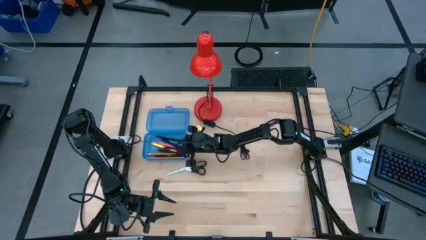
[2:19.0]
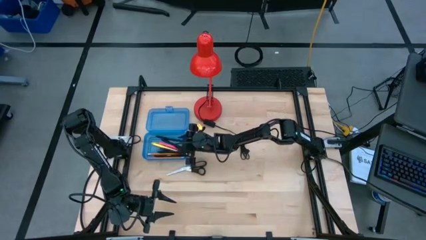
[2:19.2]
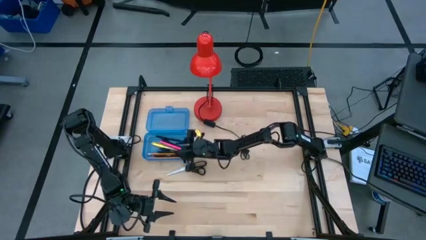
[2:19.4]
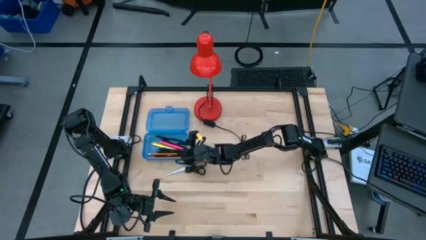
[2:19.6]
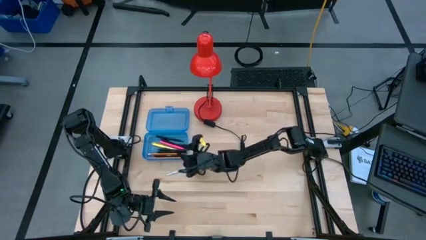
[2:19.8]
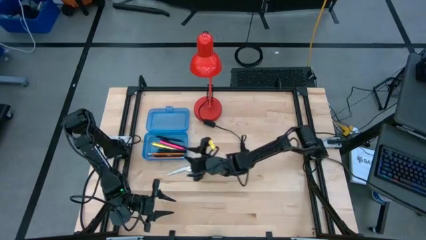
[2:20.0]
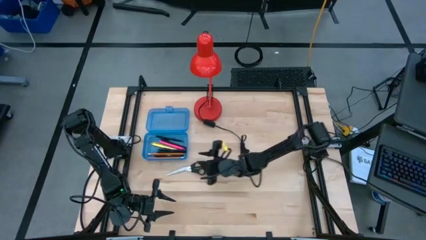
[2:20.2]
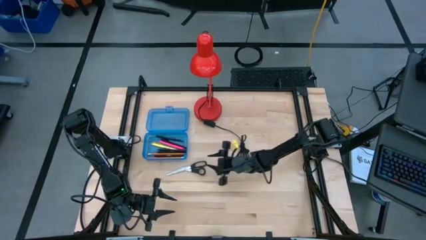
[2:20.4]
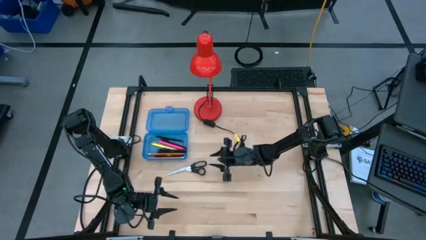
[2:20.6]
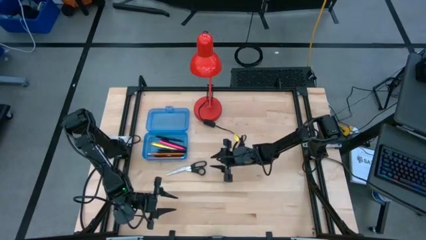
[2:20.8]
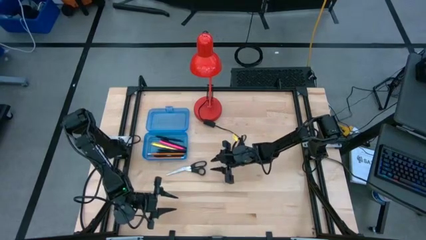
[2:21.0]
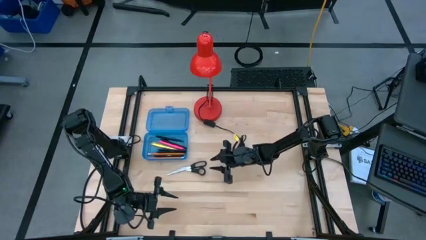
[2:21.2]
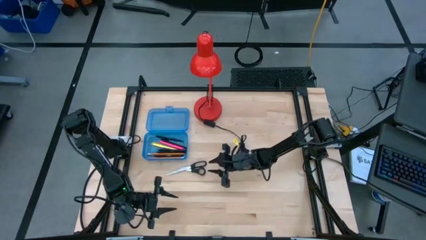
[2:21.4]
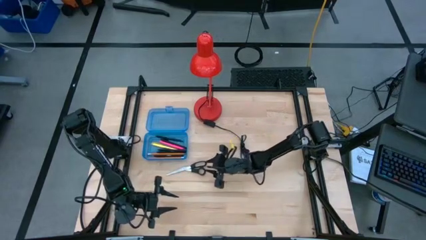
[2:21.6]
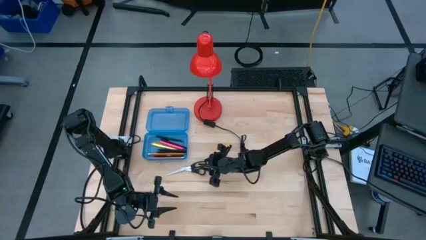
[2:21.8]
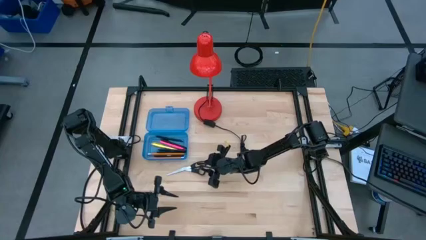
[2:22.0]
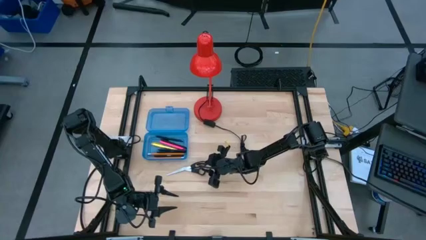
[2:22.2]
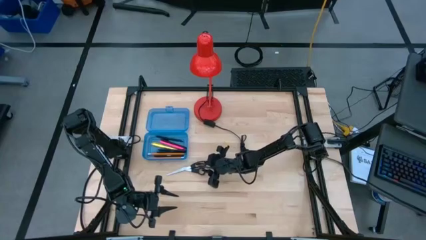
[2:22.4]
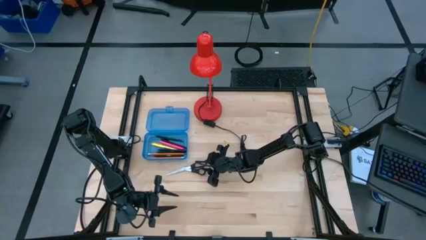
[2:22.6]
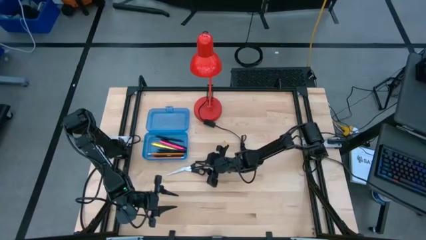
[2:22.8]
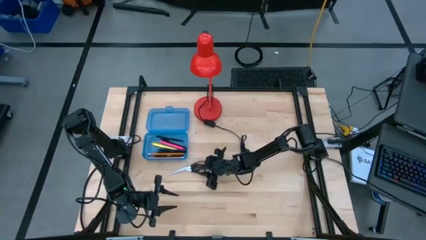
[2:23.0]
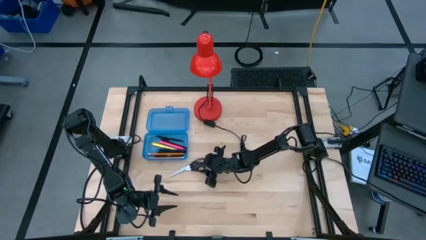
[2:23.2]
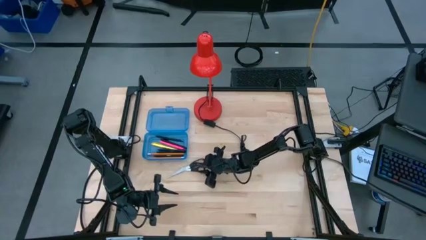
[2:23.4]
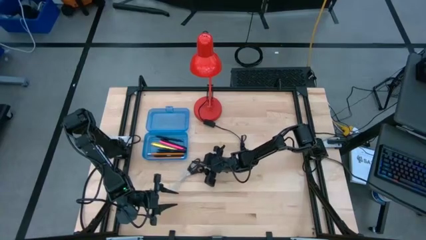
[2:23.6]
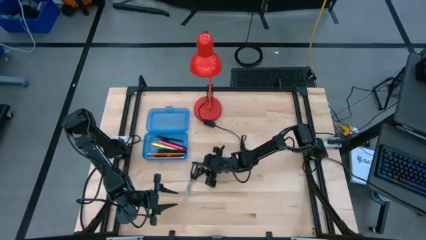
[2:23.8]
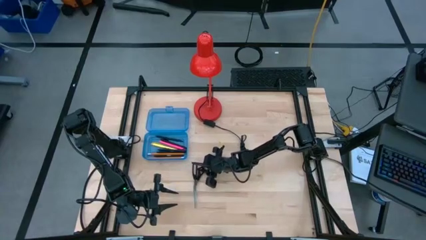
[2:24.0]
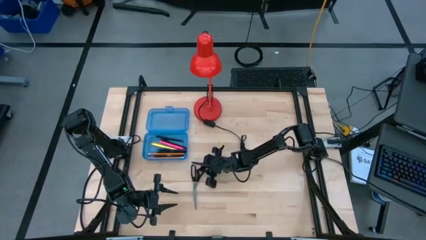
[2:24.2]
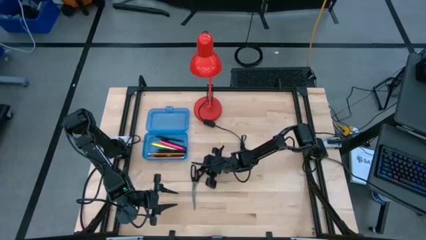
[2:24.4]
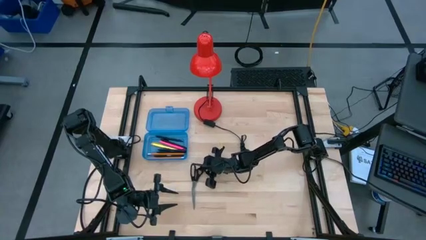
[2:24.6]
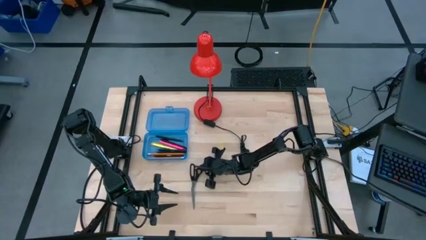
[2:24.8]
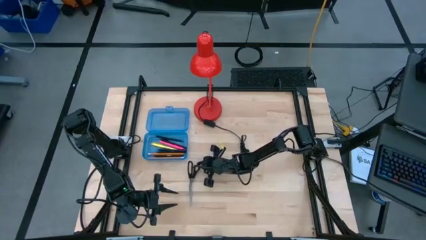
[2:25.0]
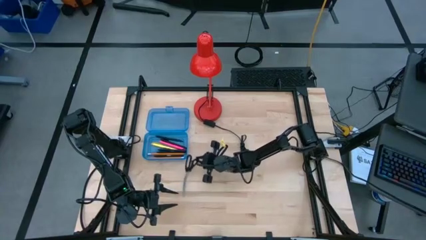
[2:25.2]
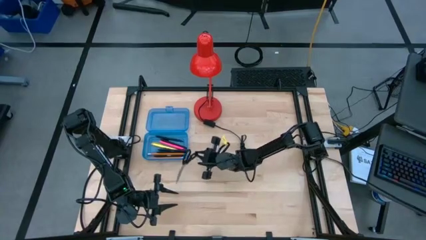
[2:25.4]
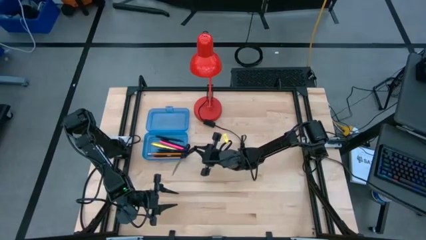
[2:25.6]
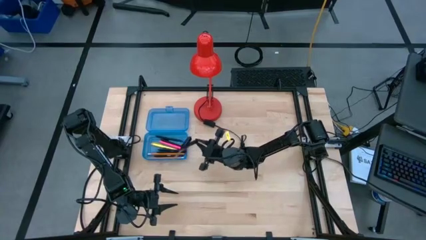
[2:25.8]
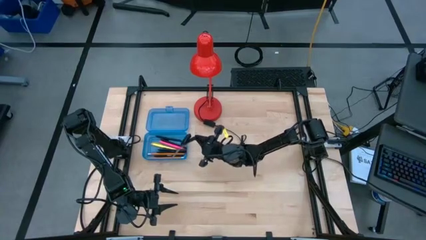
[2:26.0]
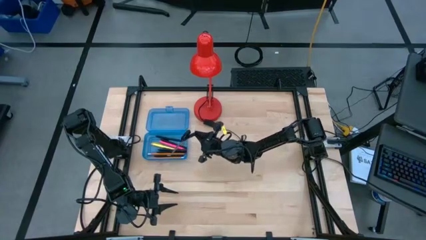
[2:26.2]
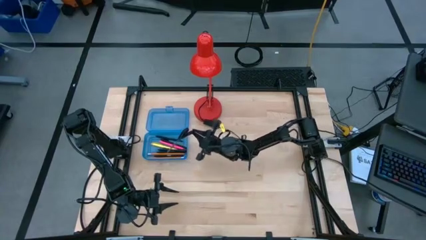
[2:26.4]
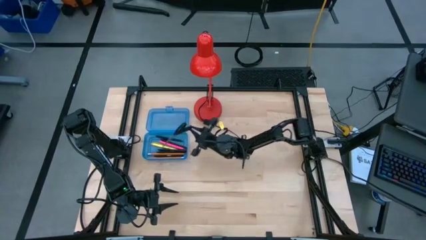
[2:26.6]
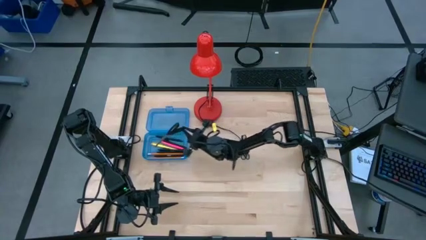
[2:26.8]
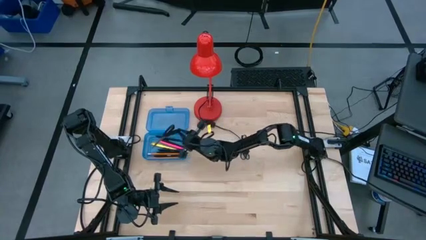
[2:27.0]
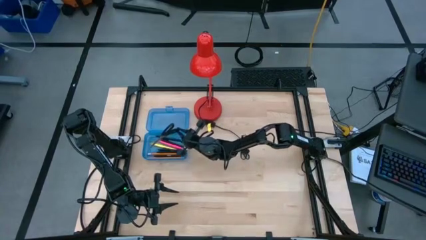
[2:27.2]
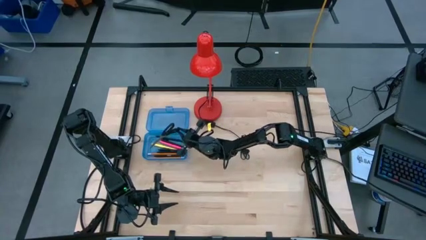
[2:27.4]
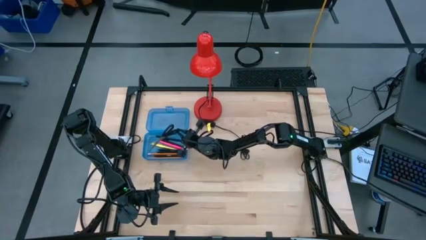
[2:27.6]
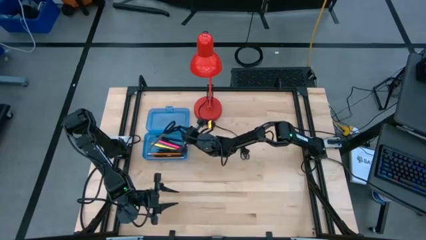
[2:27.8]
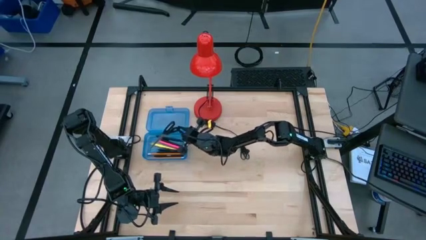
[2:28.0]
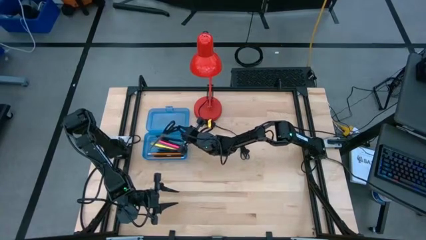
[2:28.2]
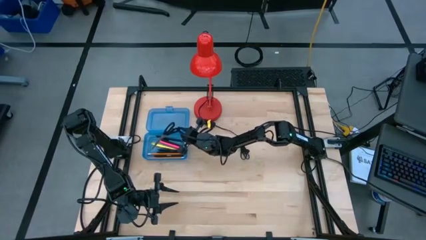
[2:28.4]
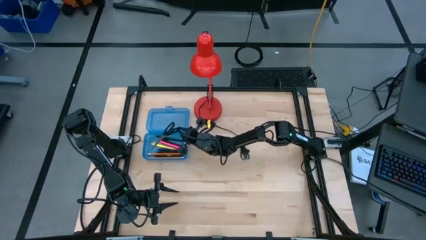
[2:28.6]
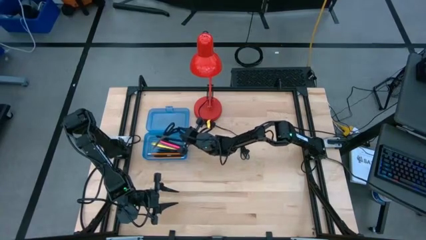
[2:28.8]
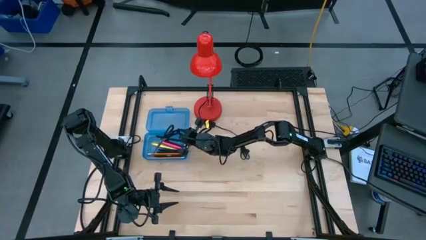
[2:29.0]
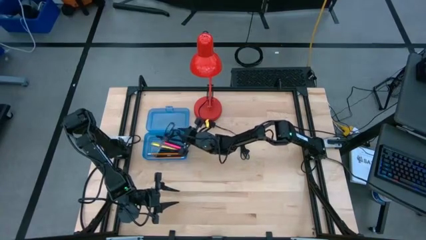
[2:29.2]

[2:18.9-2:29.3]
Task: Pick & place school supplies into a supply box
Put the black scissors into the blue supply box

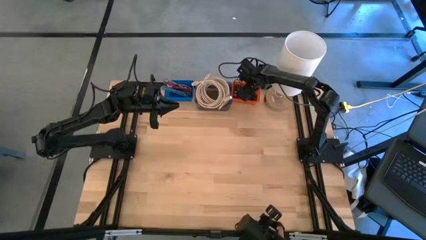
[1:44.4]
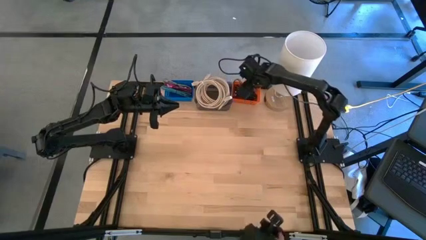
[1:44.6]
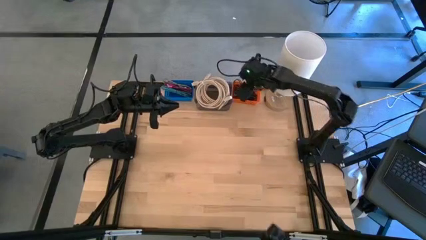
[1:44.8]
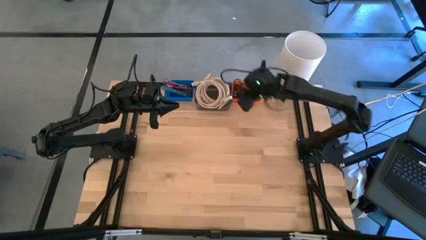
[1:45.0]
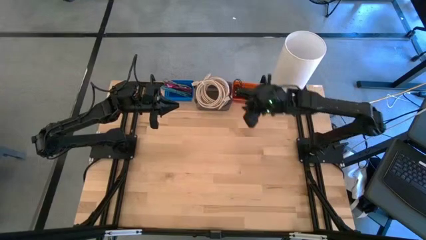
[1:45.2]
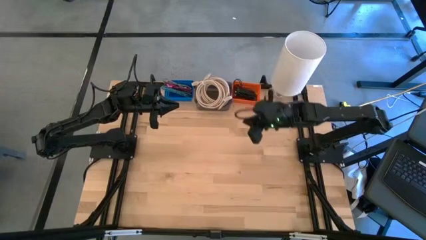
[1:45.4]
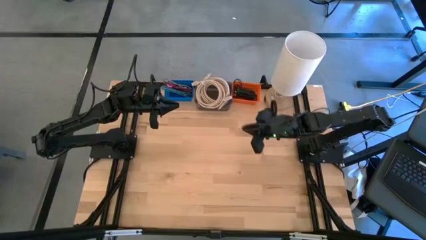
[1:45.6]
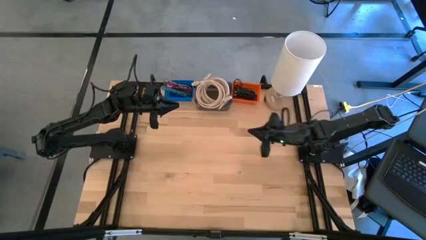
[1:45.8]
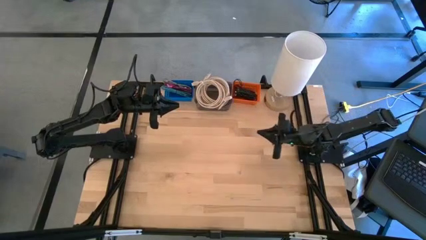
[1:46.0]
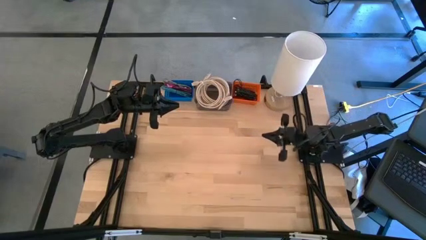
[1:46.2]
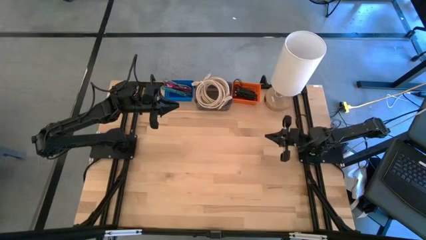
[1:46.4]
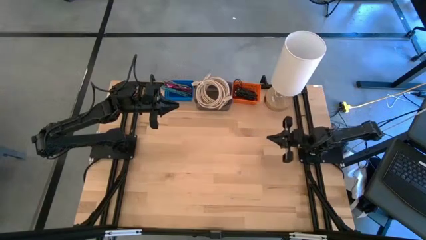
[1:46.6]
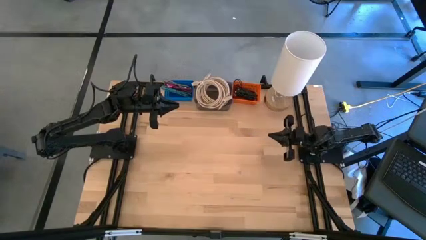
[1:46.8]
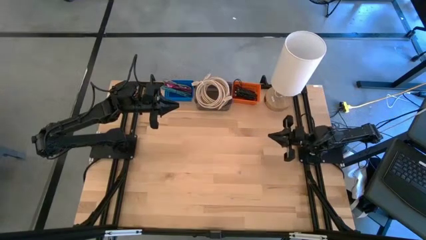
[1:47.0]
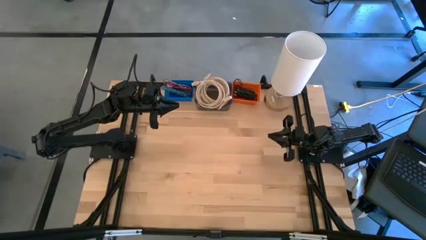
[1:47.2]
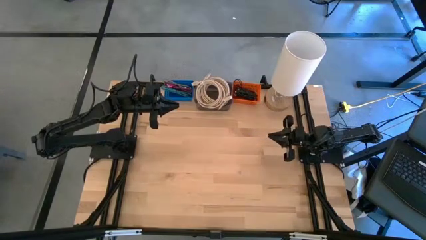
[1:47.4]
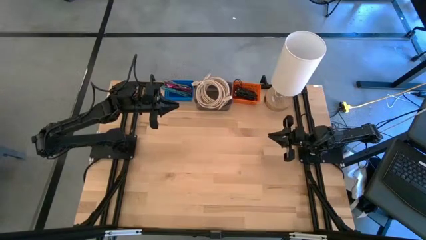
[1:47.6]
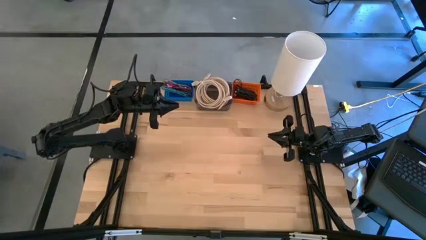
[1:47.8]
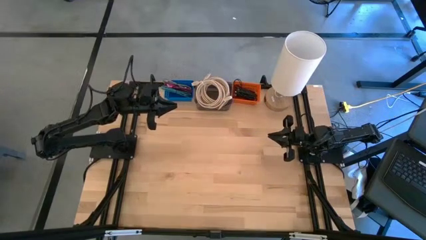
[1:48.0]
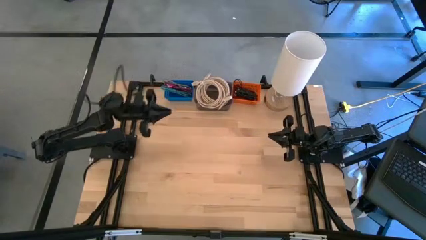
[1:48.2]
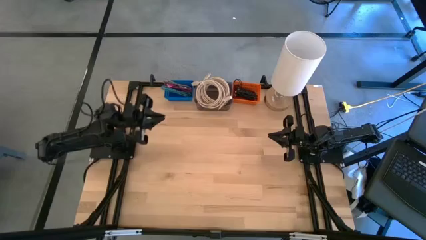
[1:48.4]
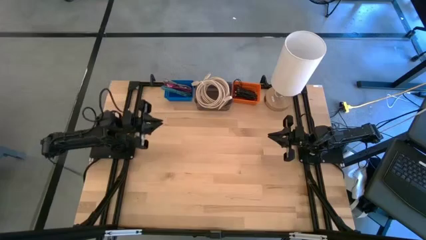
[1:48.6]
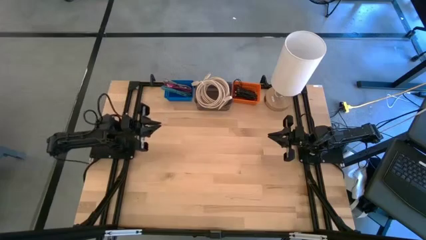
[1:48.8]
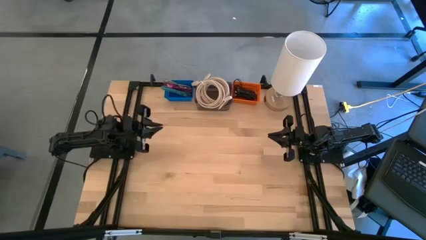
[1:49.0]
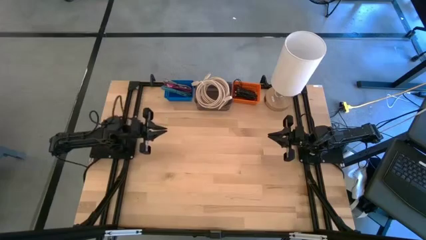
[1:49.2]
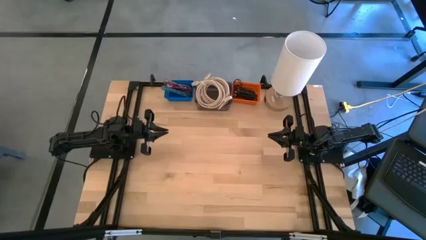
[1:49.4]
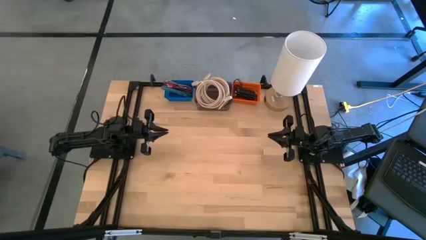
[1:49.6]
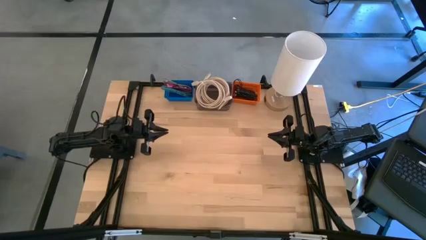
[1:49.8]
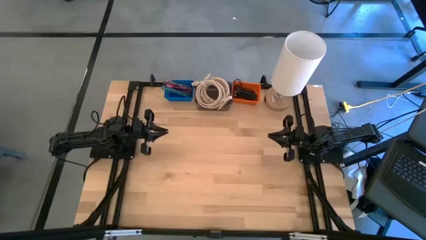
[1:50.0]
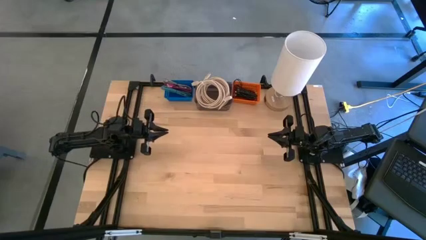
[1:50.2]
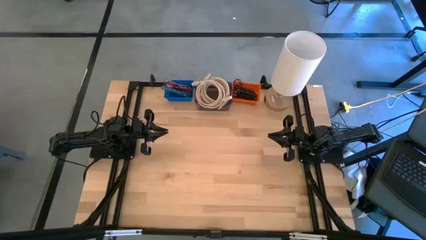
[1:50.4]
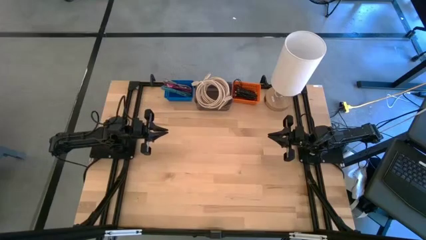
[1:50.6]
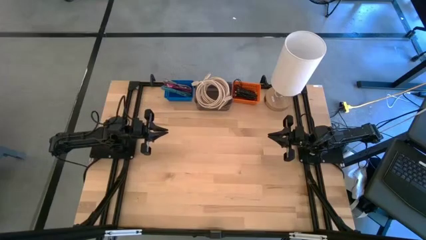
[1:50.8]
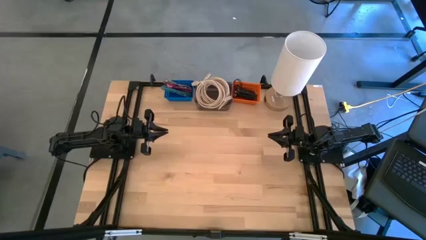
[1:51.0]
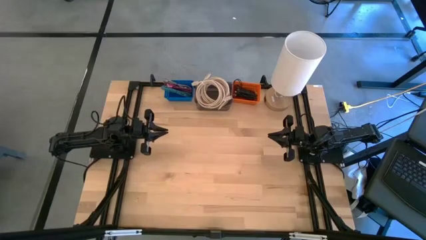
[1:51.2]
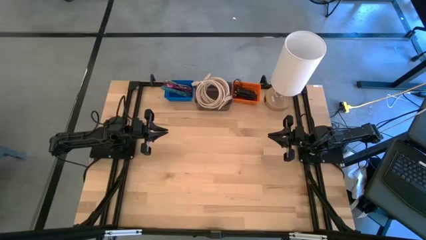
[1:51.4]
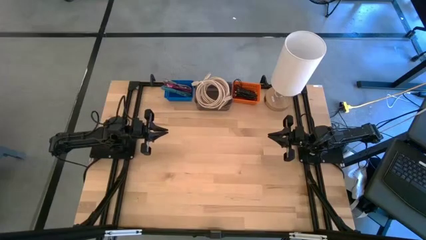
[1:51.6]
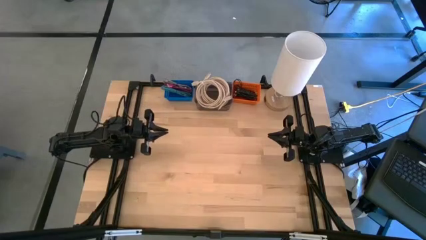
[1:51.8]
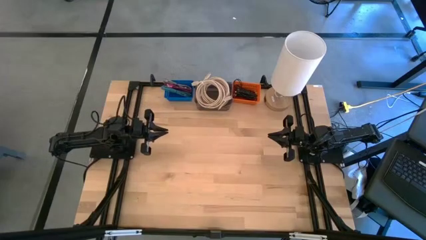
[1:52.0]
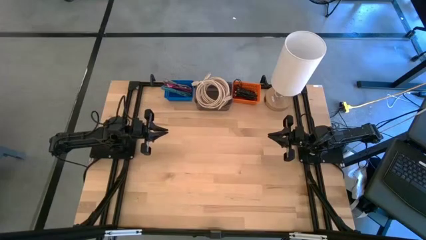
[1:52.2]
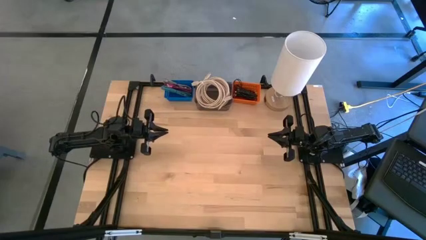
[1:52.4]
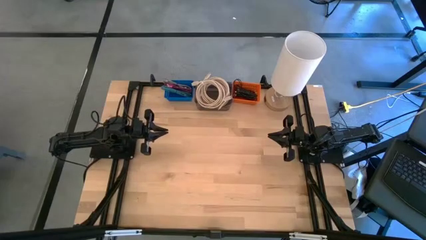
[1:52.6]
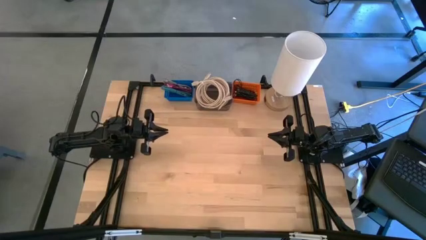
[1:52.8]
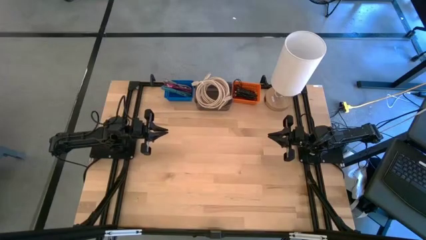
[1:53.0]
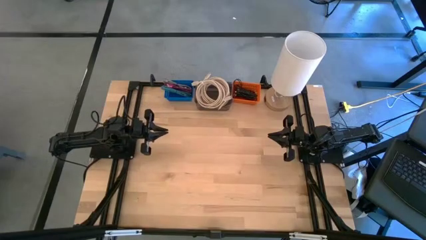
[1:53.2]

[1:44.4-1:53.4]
Task: Pick & Place USB Port
Return to Home Position
